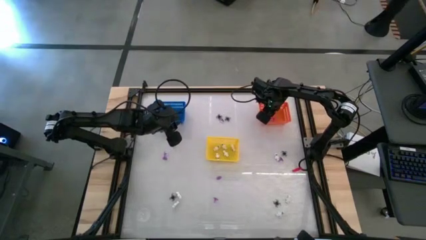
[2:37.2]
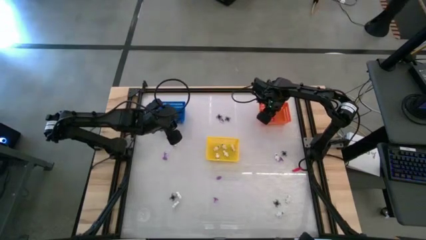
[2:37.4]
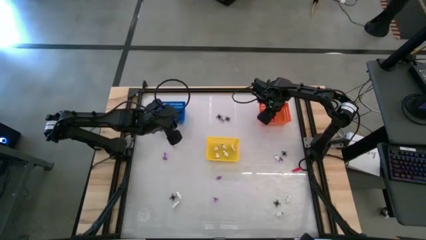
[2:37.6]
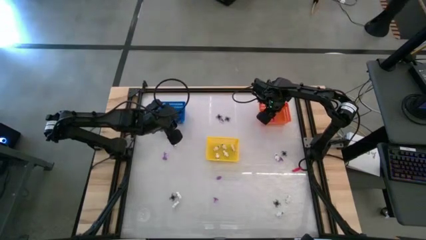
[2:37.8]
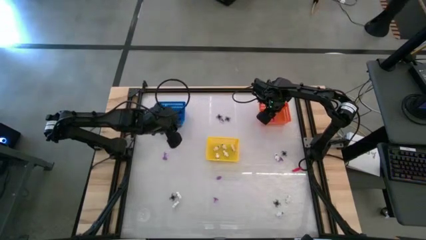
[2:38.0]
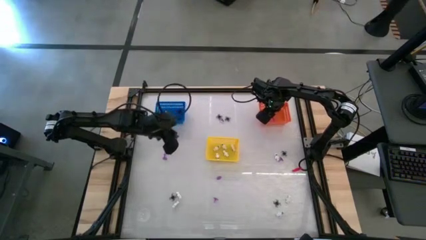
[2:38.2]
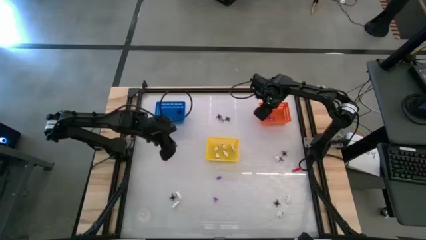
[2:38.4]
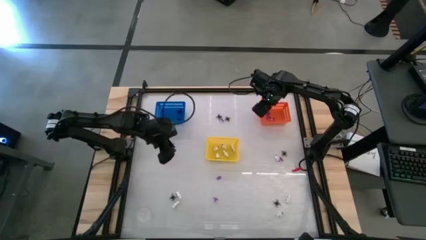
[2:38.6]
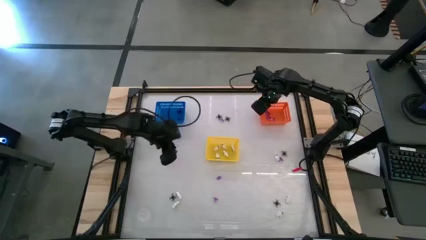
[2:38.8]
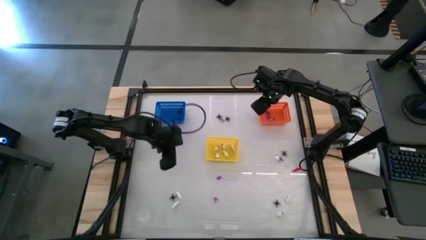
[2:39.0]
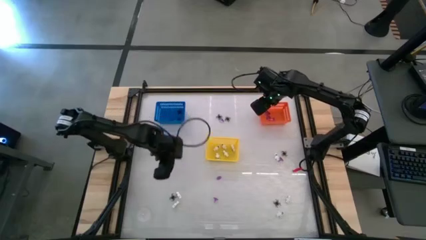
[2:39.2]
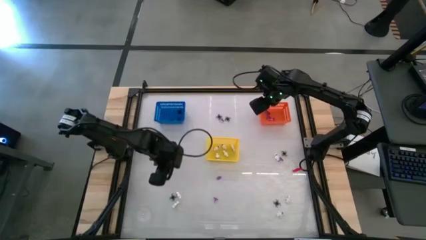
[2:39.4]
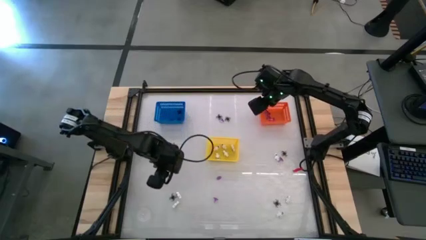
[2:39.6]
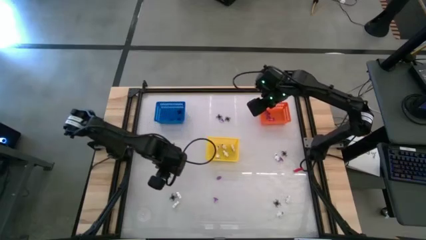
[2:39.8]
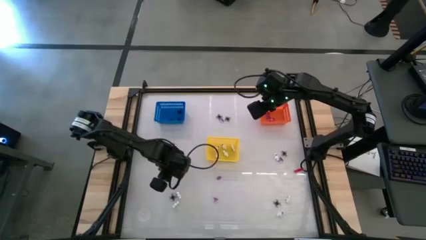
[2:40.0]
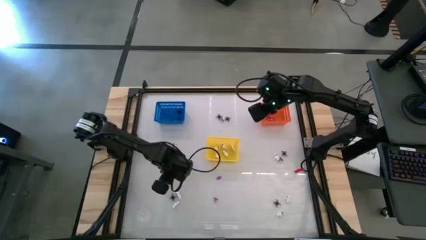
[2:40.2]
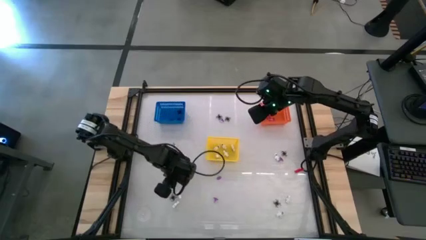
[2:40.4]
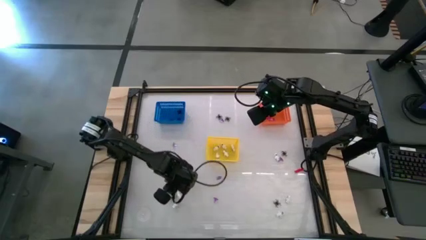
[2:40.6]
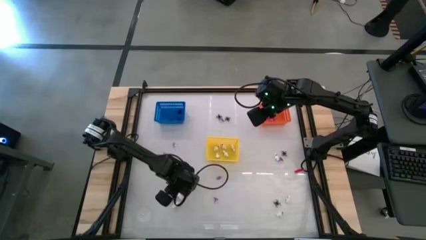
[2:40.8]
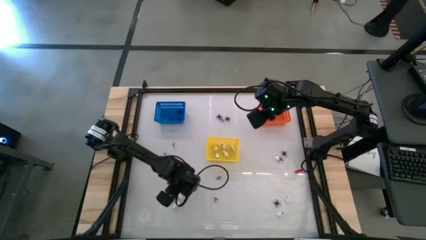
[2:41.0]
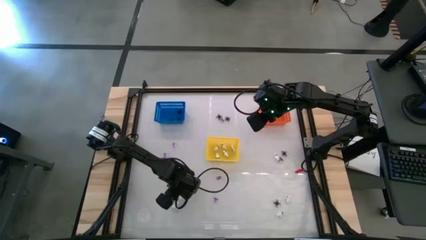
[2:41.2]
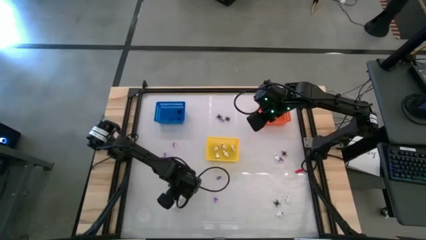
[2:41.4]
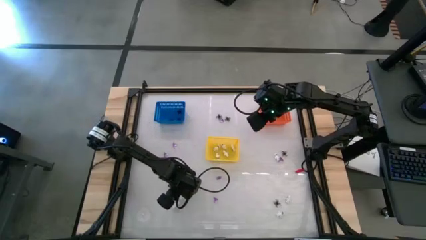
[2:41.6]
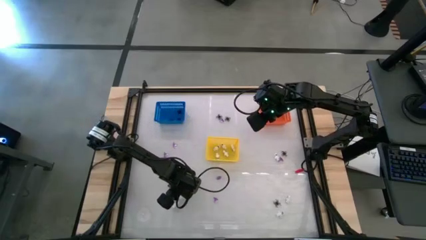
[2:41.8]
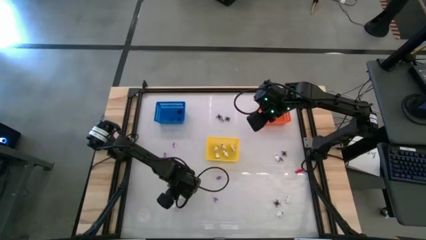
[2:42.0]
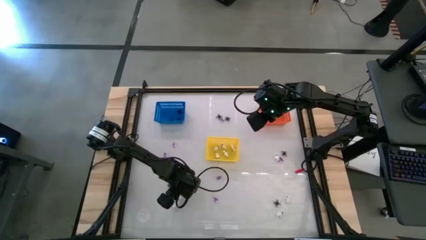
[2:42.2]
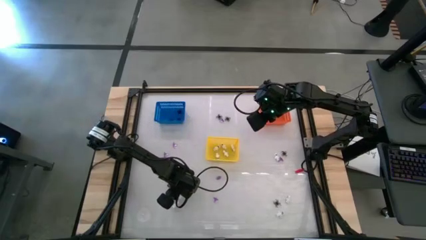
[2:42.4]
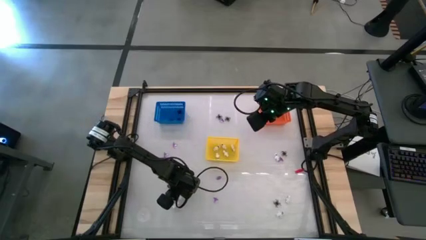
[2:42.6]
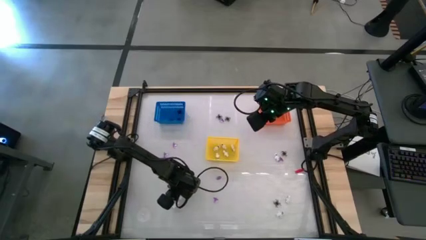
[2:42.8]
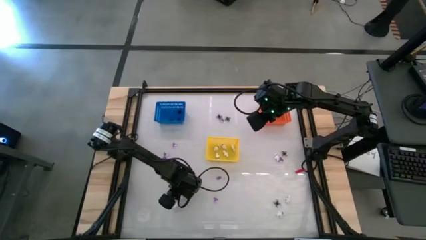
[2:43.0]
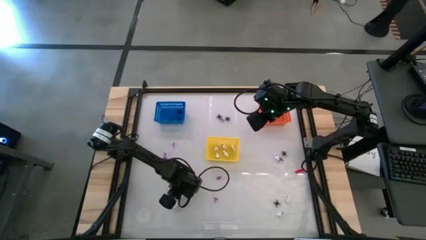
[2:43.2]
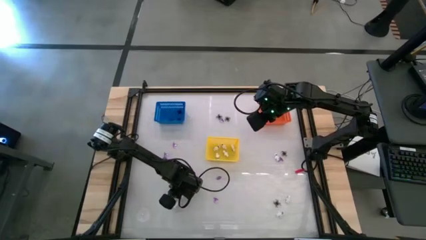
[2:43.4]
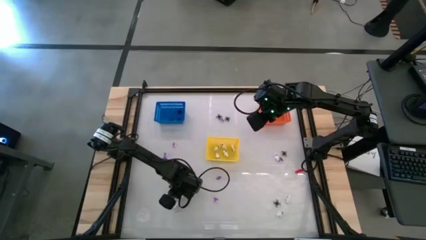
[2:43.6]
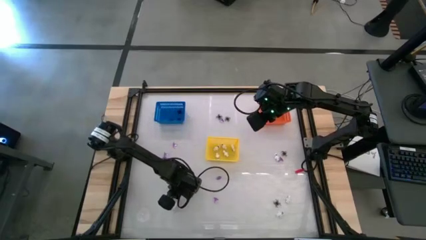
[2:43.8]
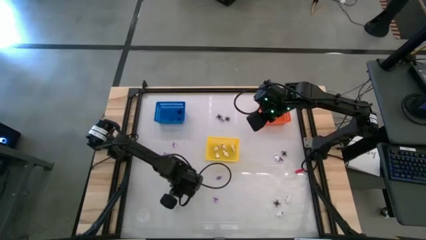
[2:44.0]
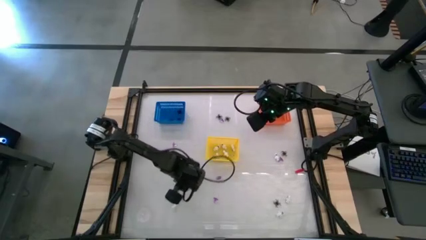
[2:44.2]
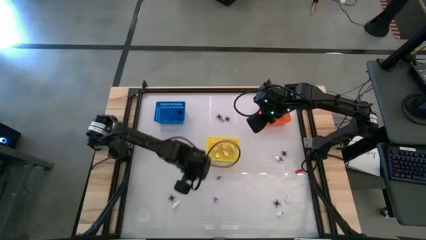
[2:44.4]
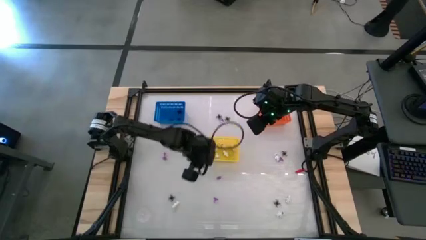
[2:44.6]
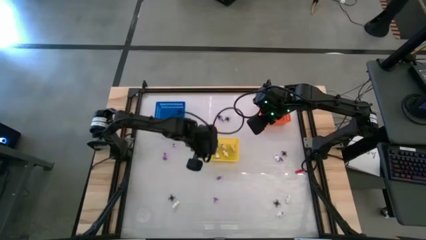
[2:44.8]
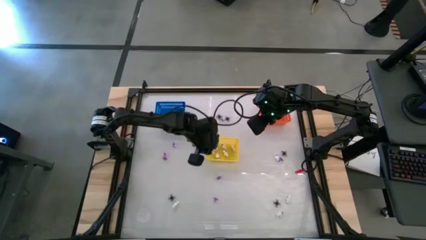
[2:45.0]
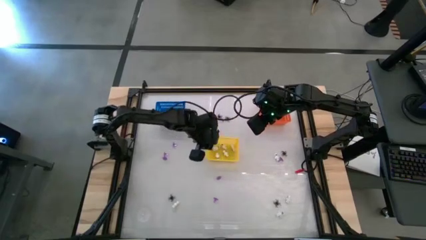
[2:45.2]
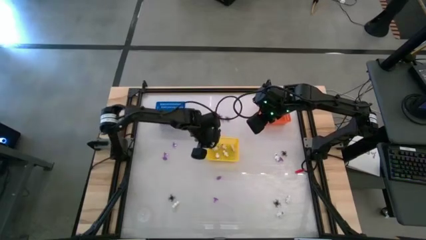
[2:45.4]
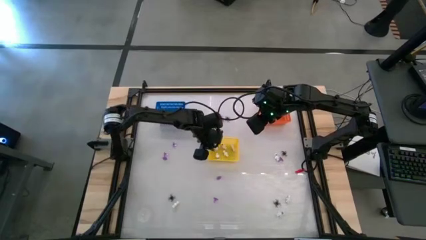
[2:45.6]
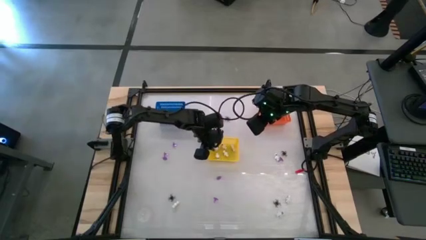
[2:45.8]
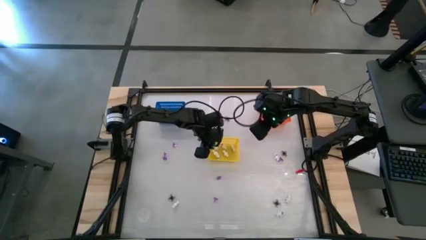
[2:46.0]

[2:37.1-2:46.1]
Task: Sort Halloween decoration
Put the white skeleton toy into the yellow bin

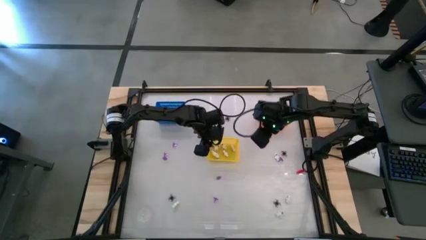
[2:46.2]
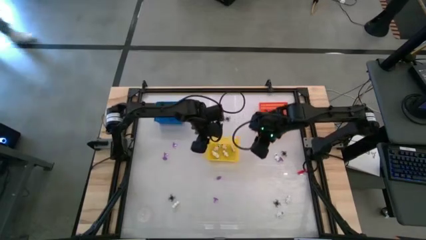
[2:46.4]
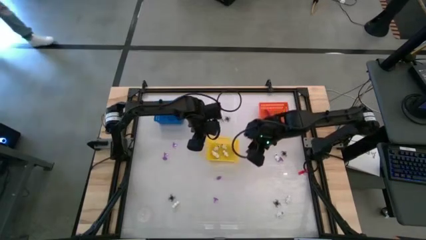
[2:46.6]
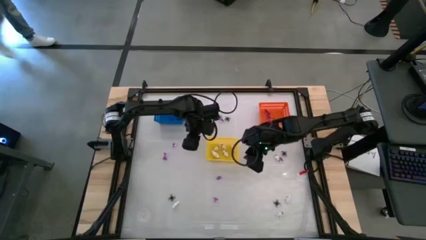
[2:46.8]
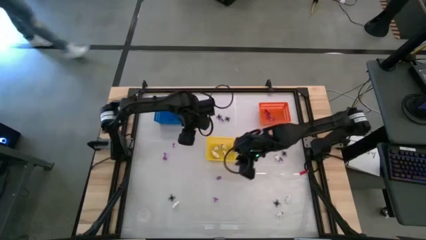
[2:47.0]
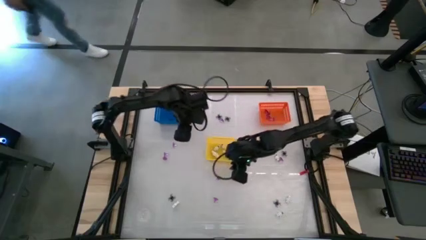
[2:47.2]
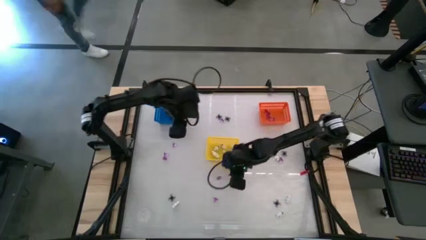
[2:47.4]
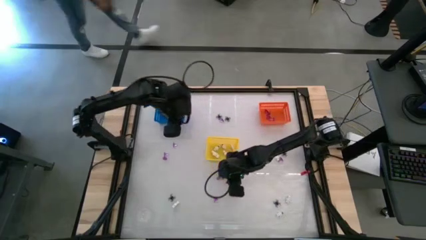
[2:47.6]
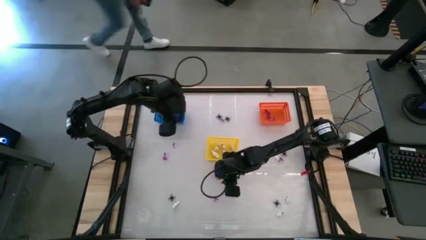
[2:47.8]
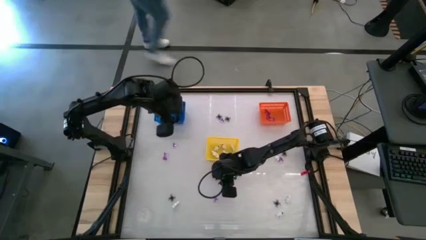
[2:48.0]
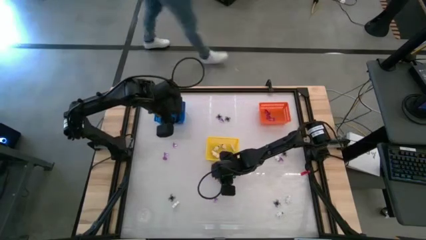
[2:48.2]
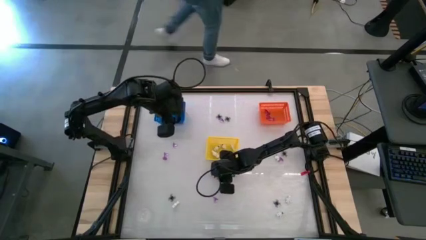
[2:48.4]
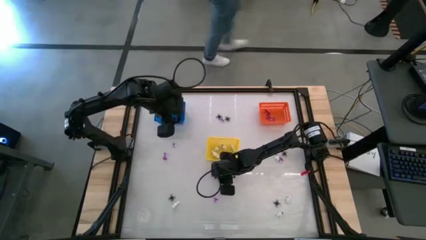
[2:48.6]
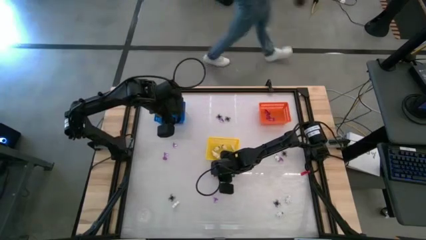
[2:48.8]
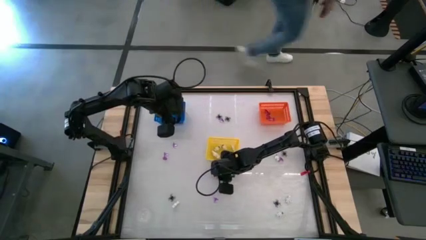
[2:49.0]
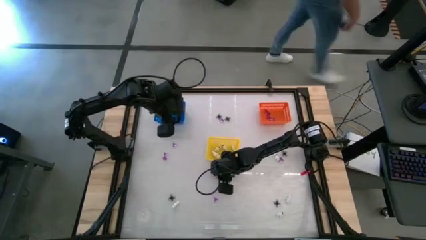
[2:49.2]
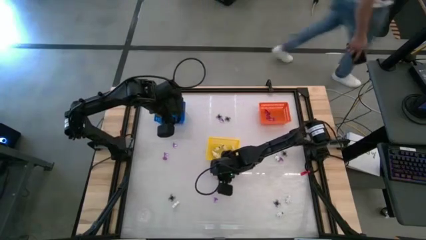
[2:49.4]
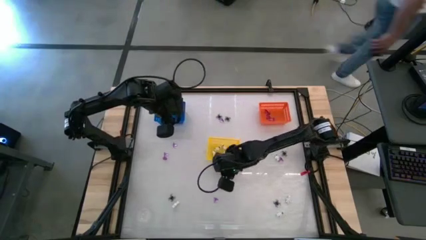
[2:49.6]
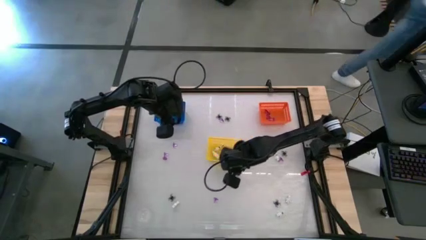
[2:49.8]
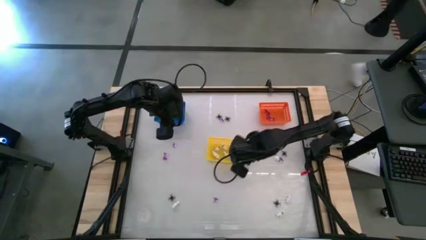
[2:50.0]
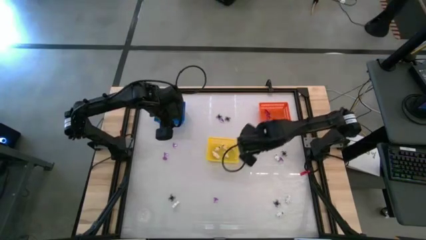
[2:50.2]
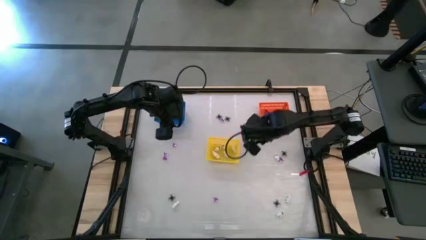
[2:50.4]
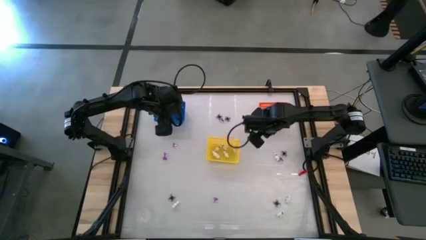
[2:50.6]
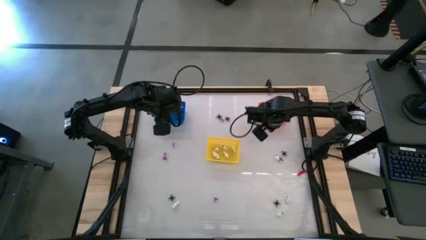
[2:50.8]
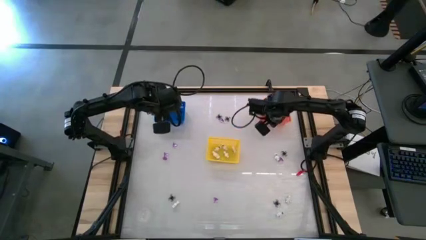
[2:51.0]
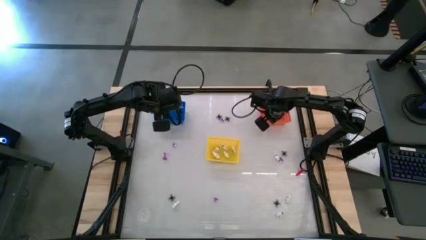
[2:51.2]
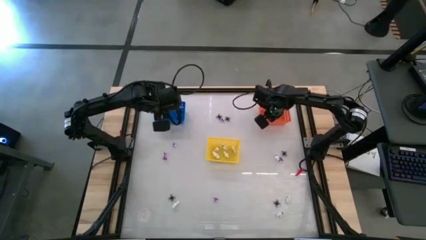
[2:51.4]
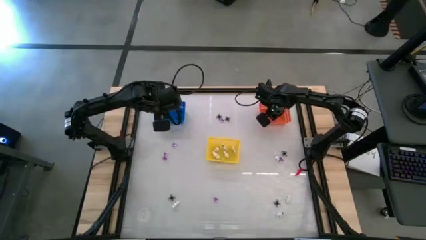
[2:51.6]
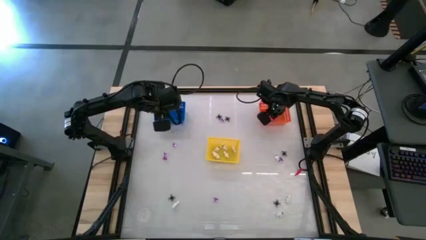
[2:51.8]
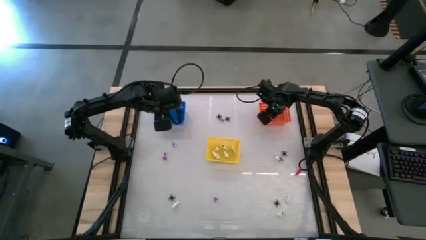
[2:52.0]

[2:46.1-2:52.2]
Put the purple witch hat toy into the orange bin
